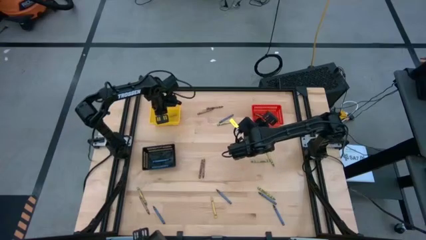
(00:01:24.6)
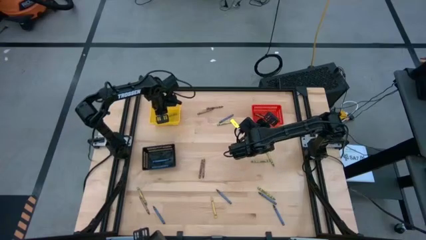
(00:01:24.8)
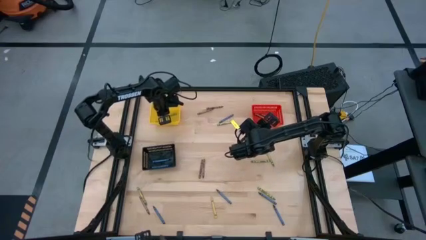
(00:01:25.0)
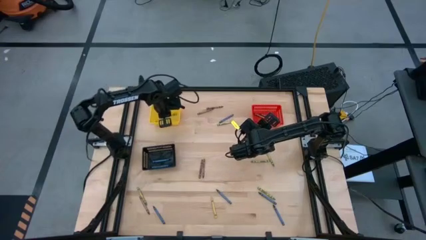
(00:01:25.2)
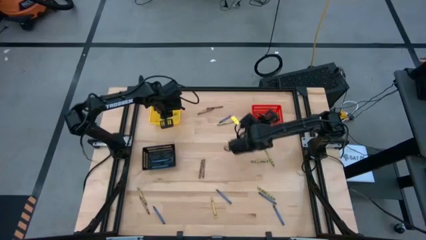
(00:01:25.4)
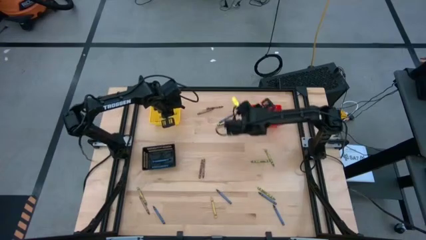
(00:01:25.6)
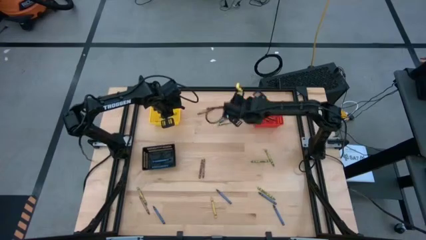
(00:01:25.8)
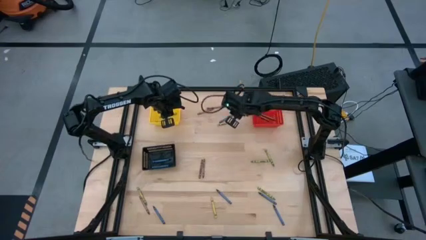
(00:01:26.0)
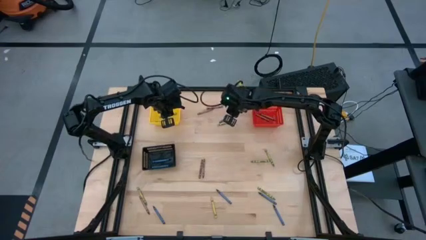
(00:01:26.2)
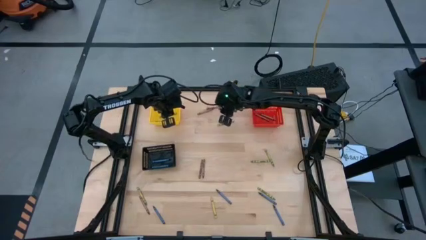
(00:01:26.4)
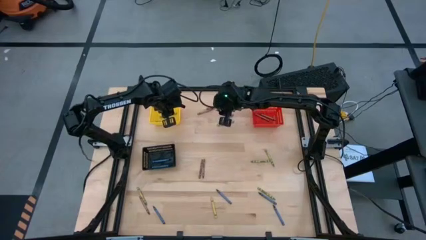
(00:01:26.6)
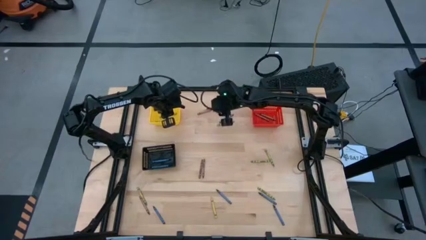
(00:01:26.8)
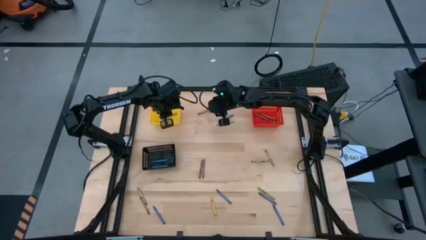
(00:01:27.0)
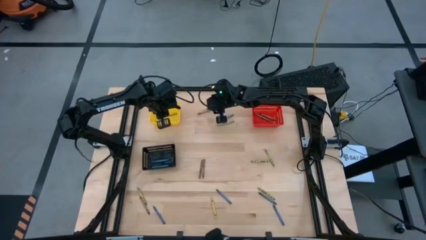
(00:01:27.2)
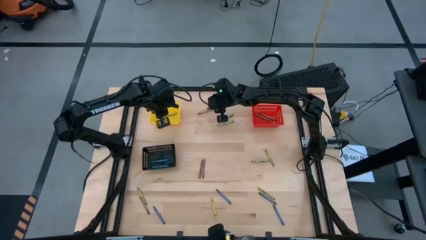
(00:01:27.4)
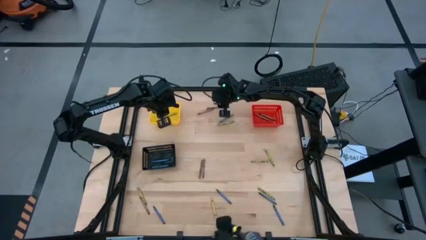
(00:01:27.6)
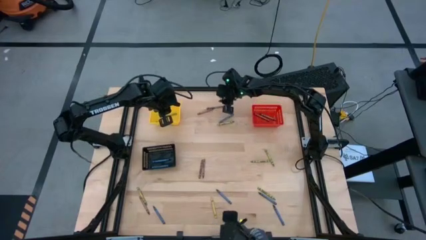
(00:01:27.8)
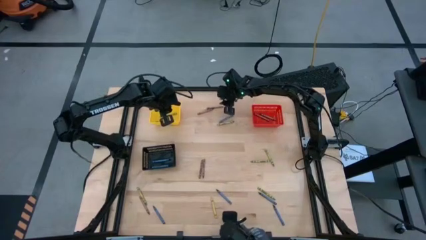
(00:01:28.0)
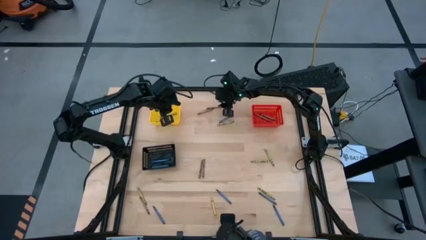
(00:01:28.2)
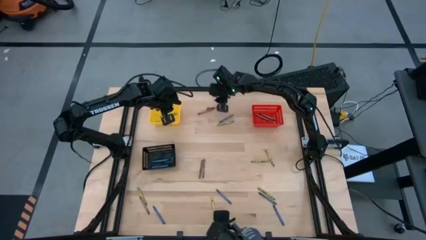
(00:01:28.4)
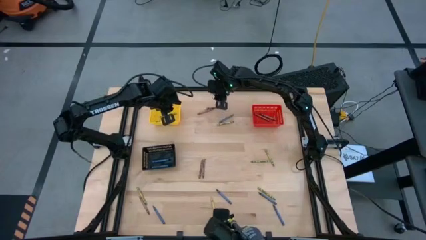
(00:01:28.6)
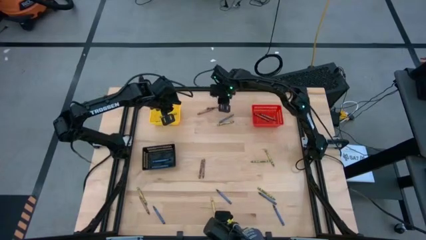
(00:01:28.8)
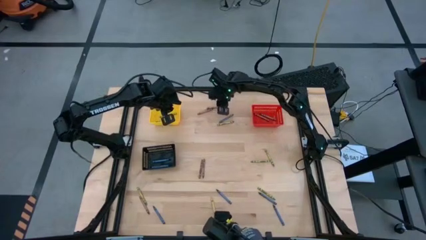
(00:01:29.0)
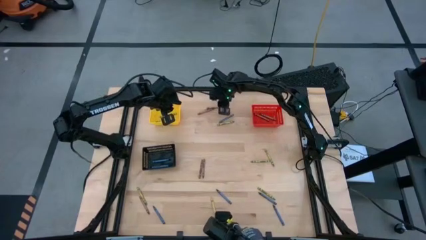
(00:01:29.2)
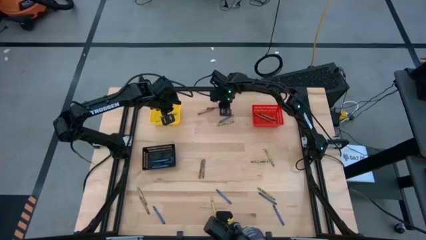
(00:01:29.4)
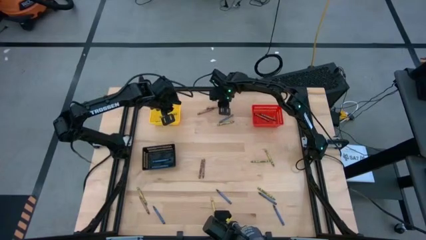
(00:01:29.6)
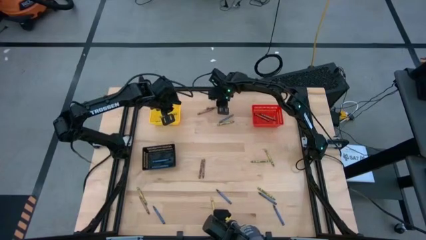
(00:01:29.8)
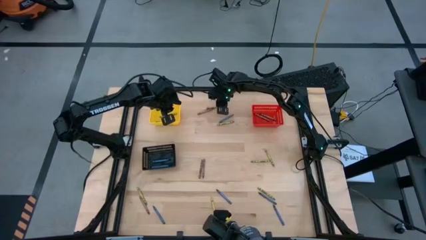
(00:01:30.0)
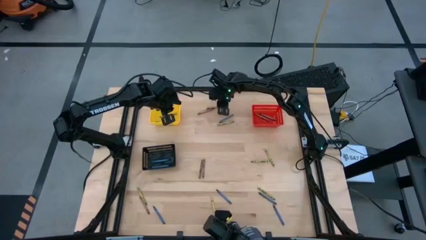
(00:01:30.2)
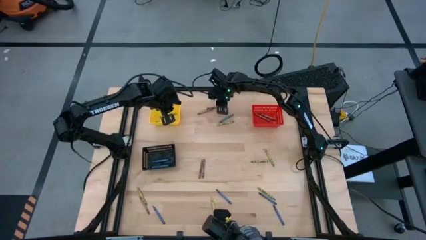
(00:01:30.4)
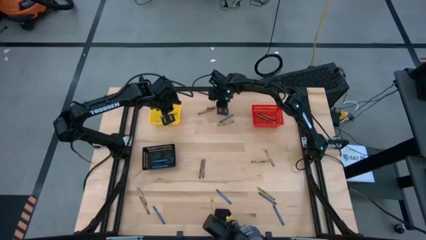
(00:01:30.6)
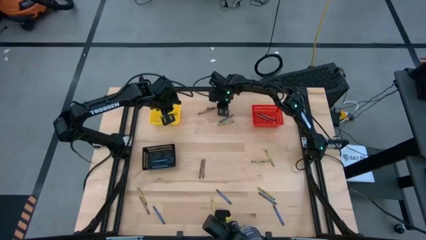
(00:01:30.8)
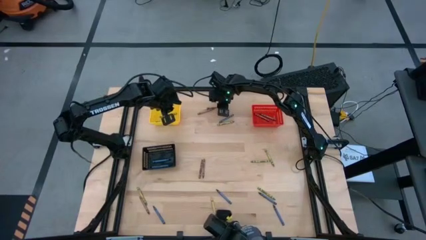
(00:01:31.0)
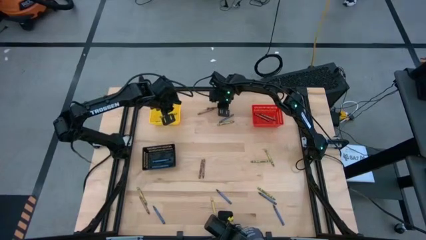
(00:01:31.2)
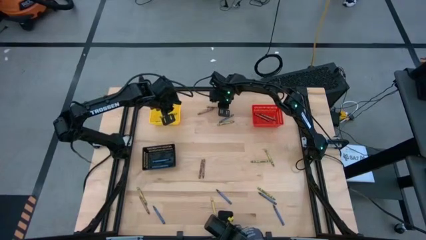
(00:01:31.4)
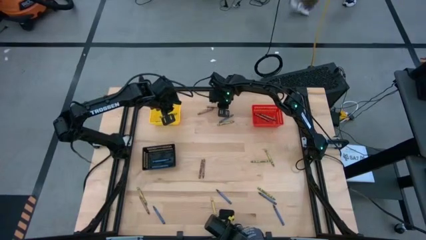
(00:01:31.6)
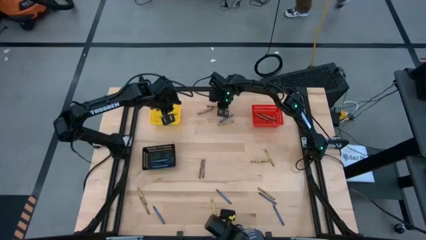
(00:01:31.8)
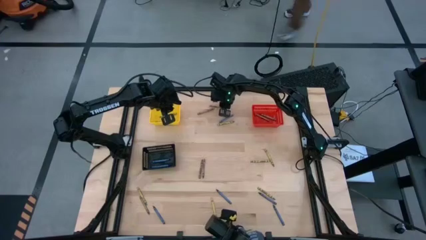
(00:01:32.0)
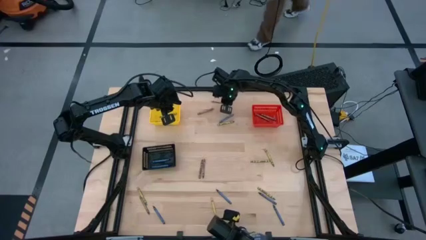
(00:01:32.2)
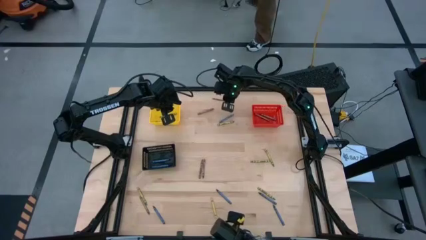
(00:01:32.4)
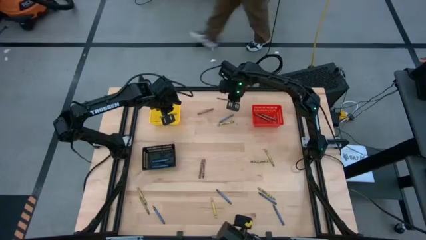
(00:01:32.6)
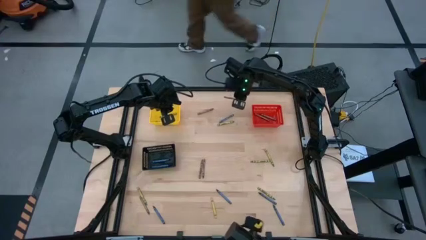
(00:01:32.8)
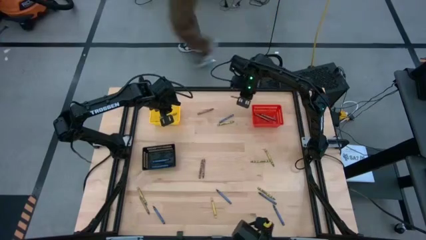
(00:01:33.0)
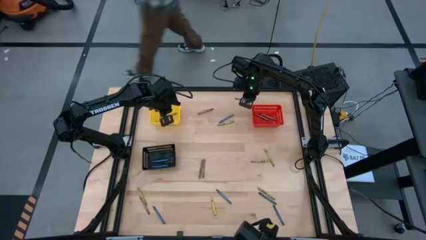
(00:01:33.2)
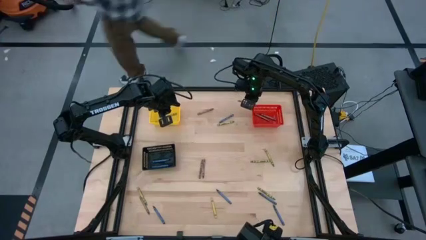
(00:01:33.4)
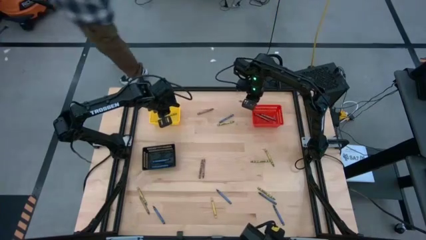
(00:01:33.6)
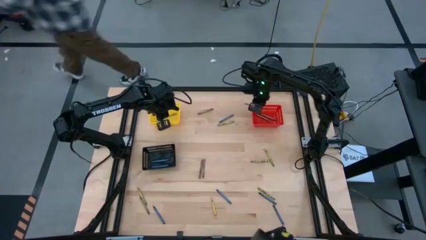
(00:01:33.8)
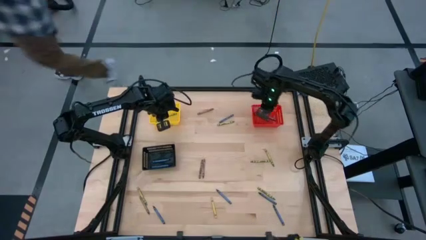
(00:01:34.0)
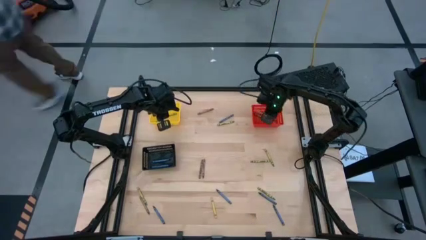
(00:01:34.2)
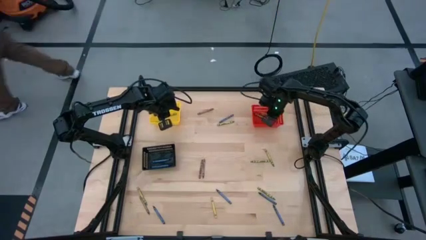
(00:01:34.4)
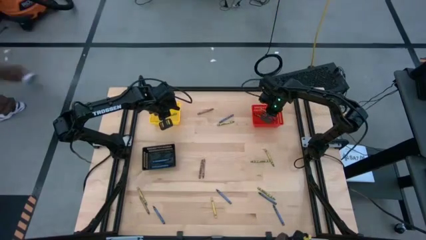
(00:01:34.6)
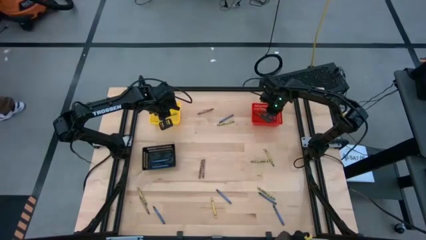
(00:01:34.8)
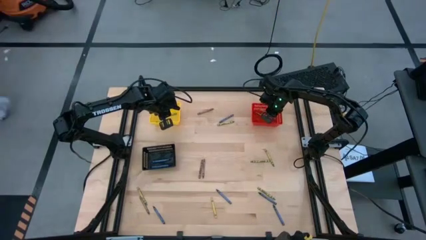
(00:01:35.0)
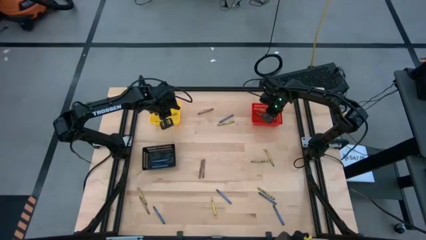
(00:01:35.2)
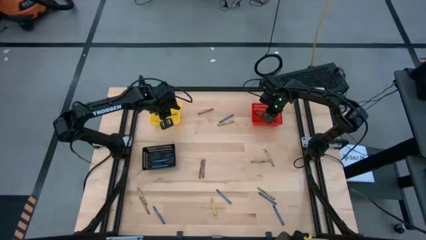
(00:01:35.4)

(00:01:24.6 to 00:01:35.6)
Task: Sort crayons
Put the brown crayon into the red bin
